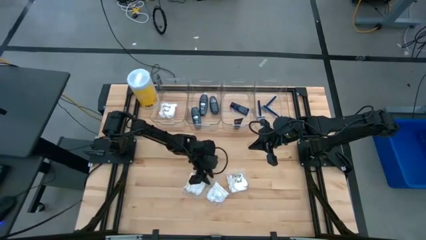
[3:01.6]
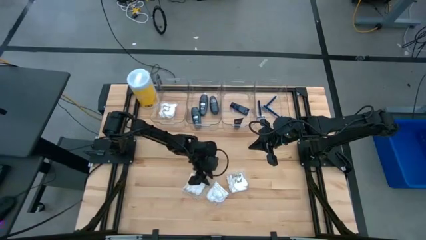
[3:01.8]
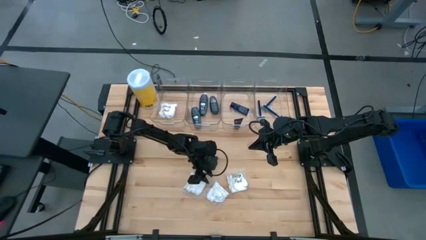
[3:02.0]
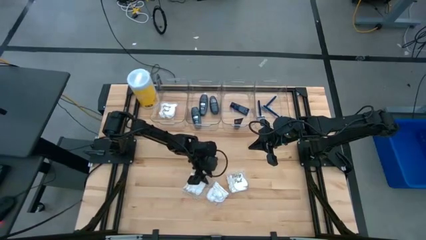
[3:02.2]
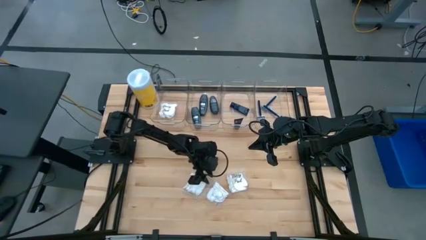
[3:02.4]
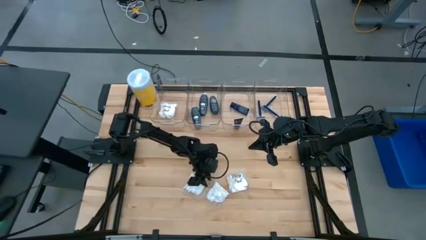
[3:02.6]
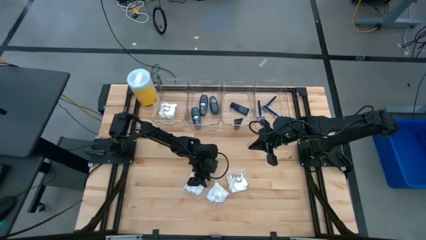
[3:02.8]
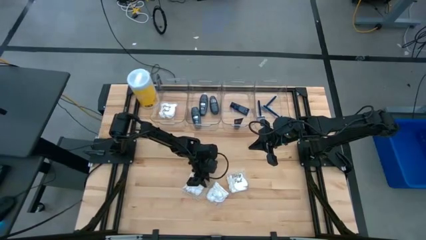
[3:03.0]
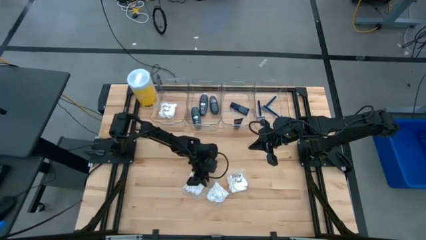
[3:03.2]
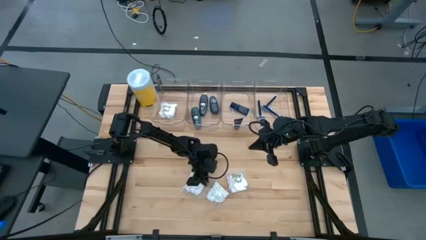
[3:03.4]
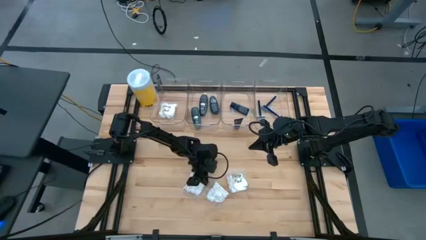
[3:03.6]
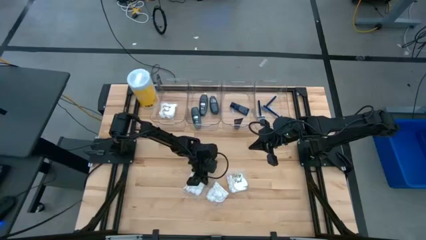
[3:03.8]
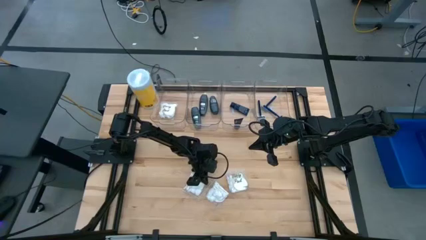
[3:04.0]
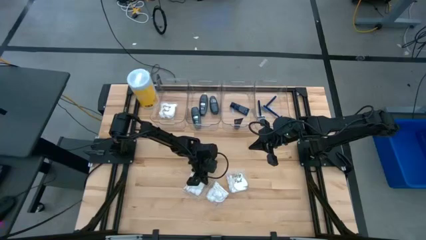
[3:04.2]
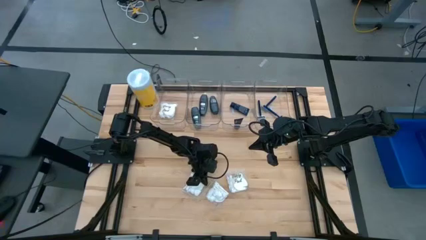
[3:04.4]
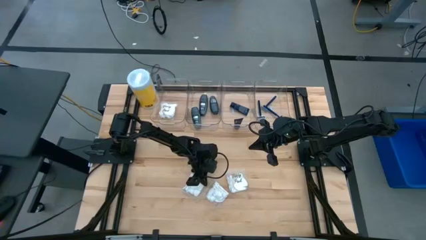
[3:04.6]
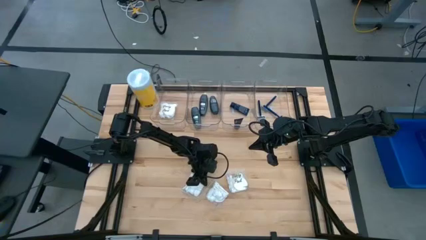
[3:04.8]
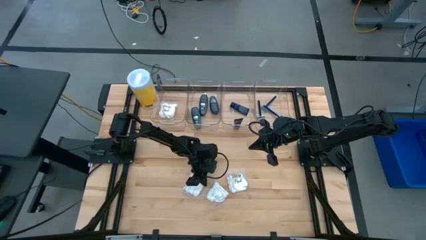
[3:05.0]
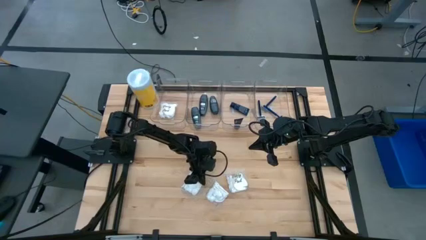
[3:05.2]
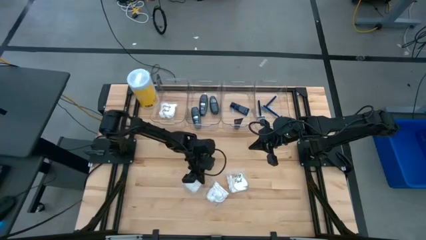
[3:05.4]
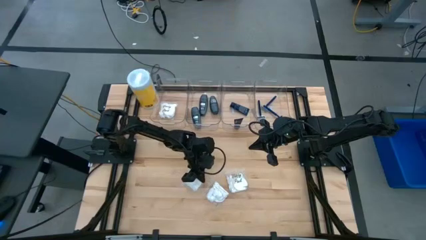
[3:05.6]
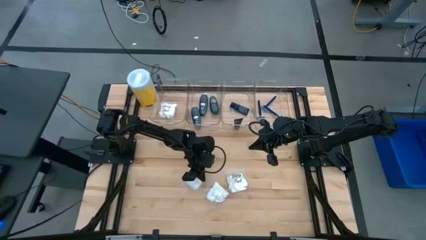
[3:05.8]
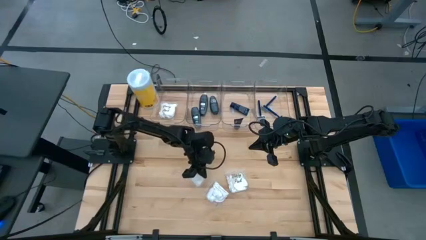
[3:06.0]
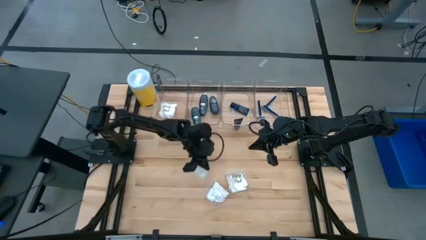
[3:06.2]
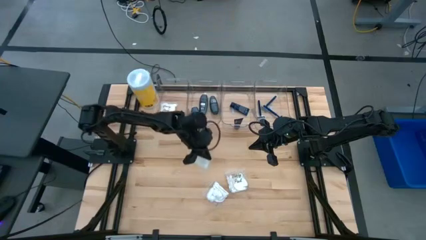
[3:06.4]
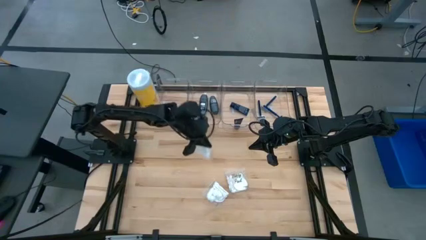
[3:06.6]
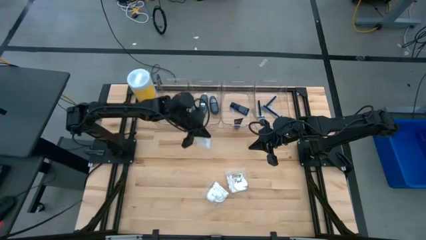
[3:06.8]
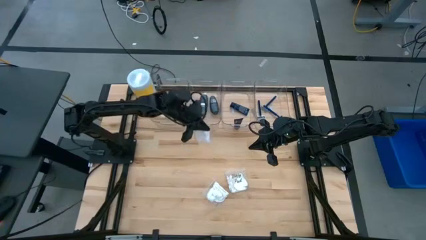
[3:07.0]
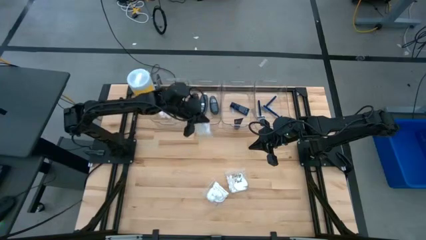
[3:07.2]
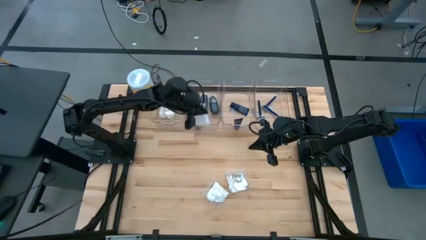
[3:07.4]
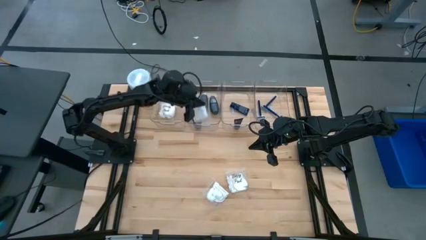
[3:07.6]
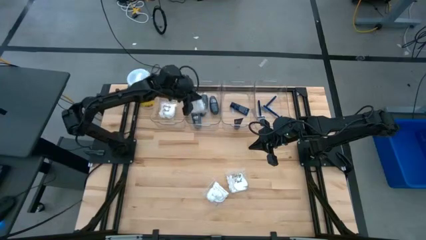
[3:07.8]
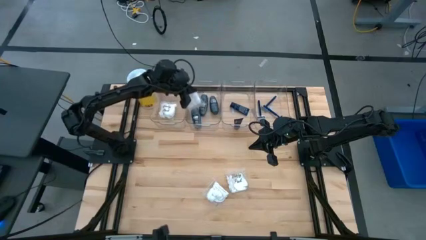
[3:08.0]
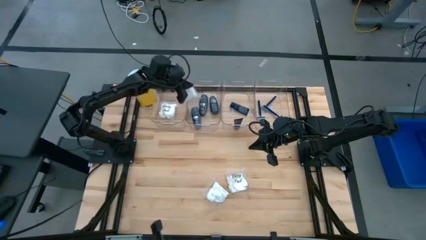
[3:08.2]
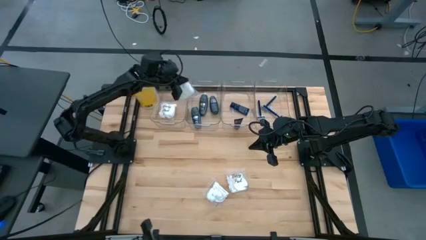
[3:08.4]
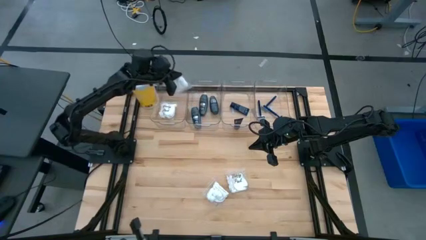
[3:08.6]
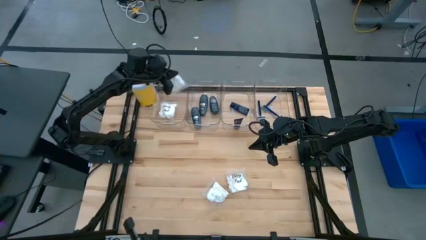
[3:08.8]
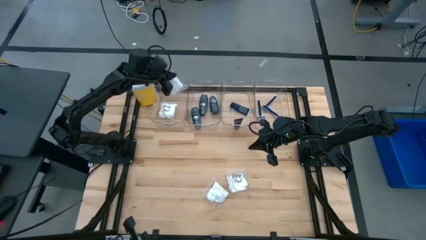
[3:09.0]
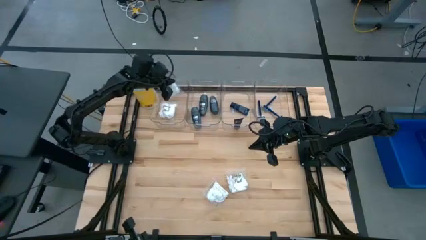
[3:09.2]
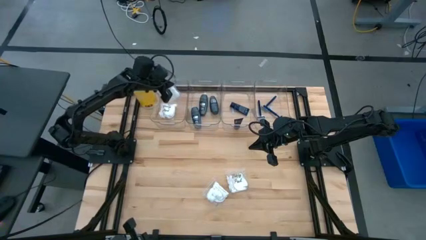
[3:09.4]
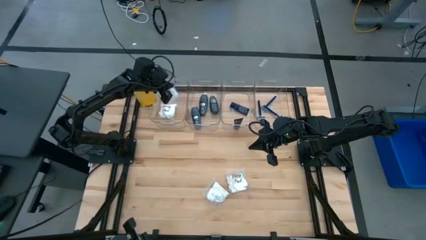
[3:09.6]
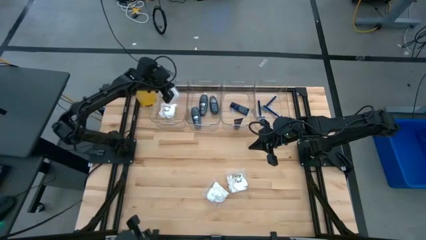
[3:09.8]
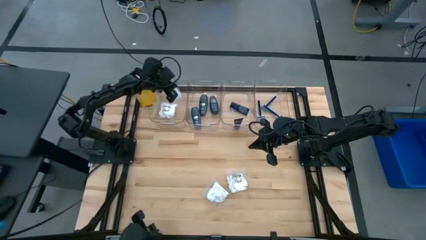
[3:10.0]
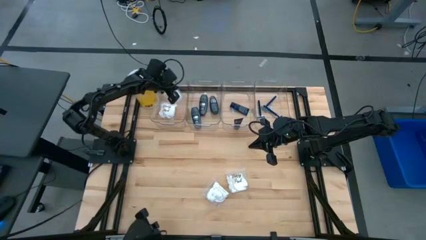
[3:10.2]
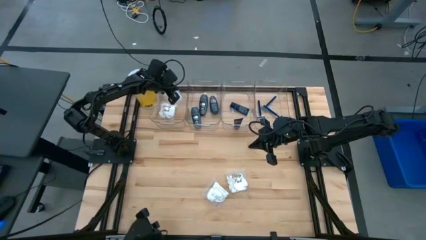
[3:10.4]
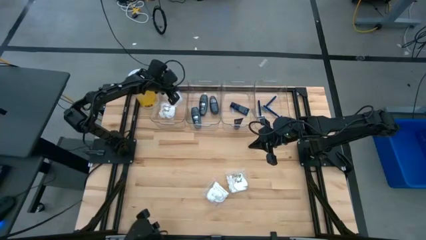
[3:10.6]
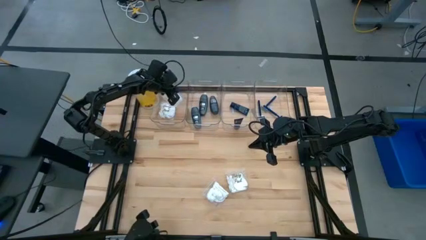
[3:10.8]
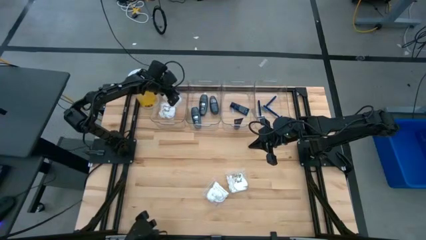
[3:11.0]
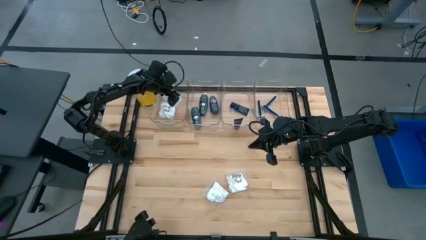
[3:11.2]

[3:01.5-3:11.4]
Task: Pick & Place Travel size toiletries
Put the white cotton pack into the left transparent bin

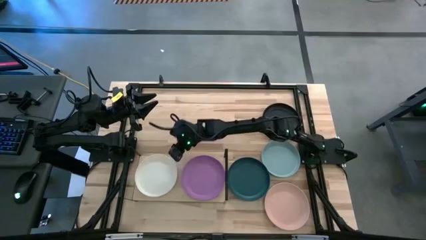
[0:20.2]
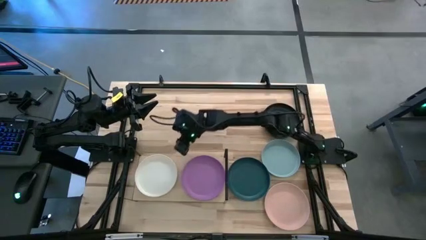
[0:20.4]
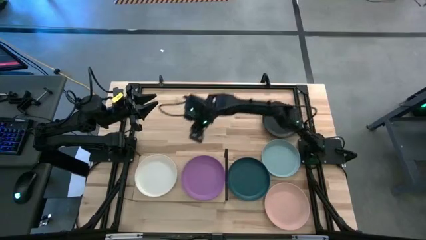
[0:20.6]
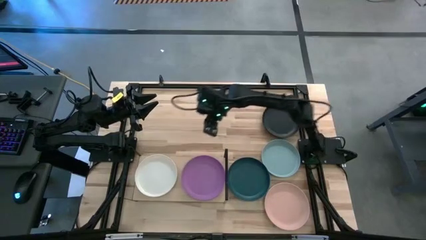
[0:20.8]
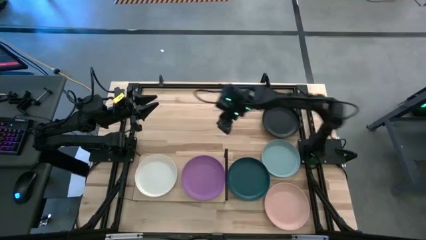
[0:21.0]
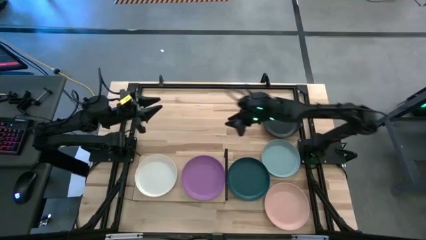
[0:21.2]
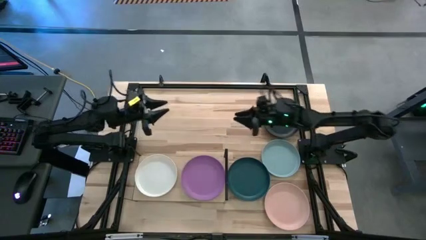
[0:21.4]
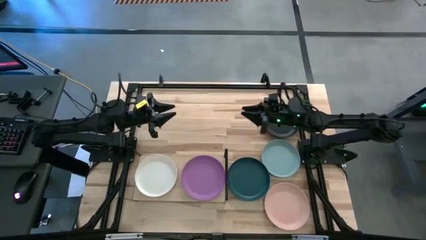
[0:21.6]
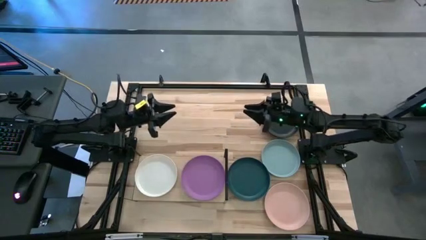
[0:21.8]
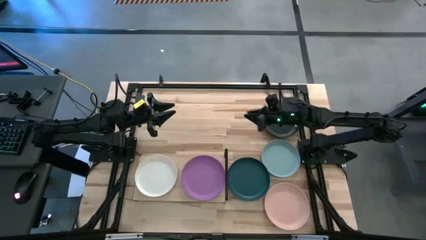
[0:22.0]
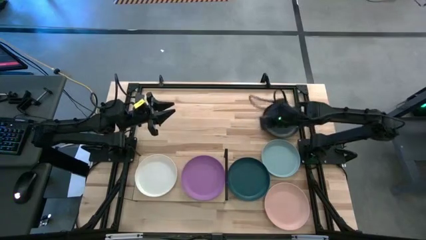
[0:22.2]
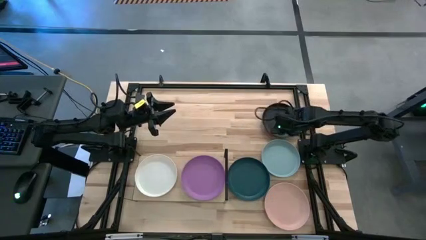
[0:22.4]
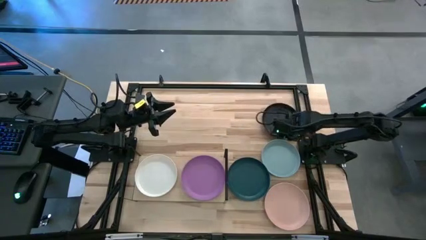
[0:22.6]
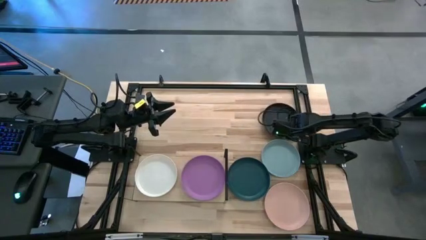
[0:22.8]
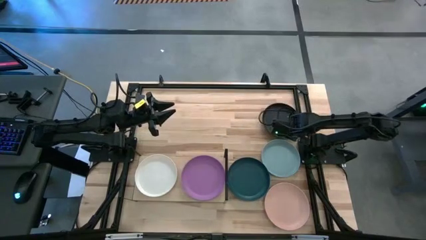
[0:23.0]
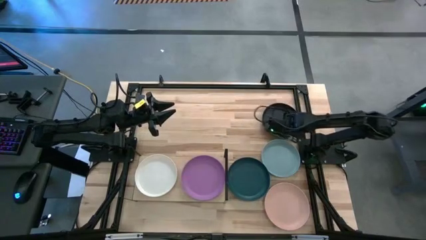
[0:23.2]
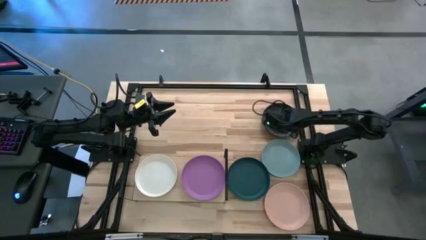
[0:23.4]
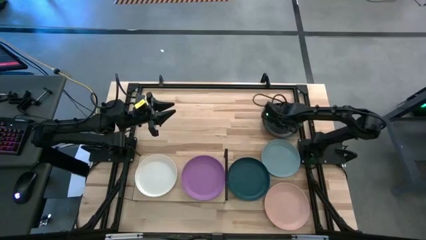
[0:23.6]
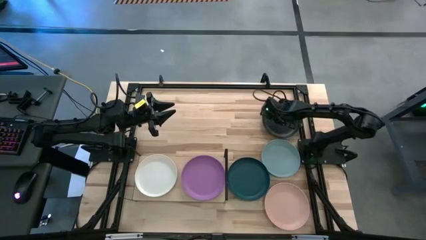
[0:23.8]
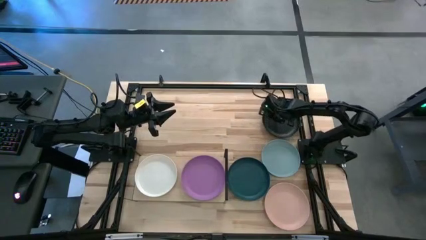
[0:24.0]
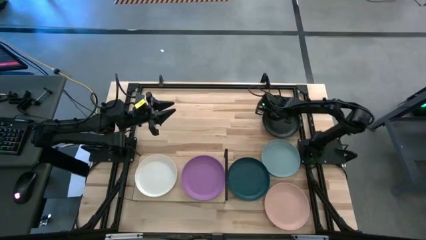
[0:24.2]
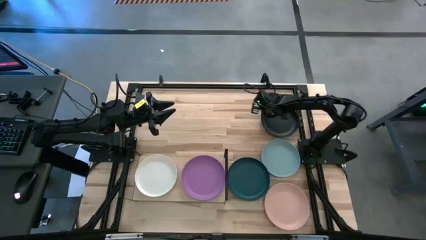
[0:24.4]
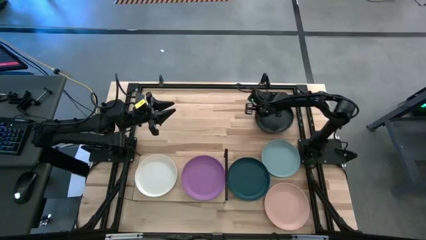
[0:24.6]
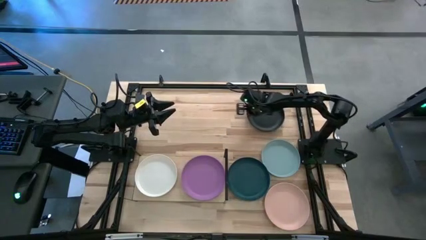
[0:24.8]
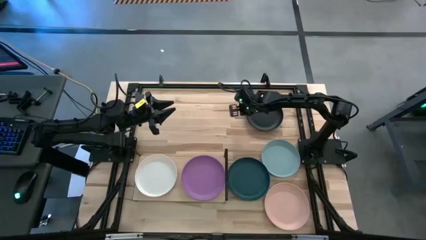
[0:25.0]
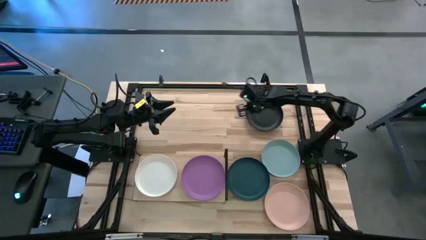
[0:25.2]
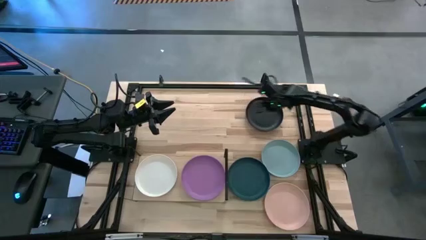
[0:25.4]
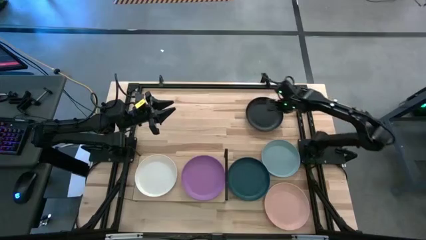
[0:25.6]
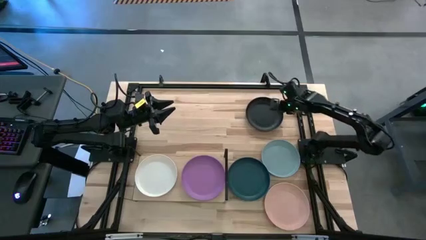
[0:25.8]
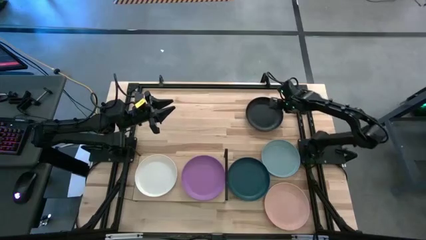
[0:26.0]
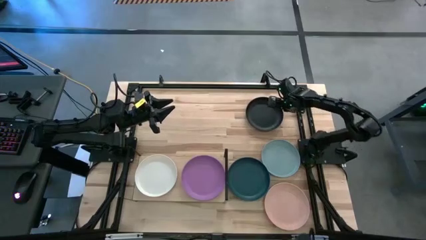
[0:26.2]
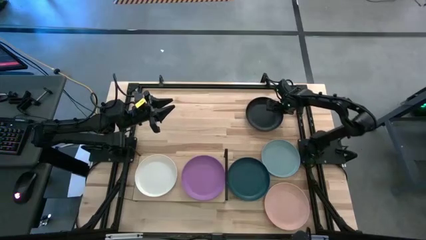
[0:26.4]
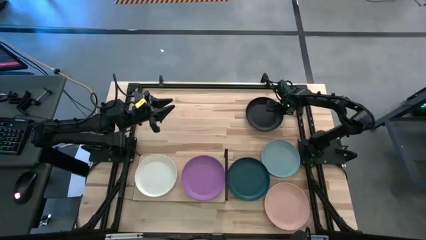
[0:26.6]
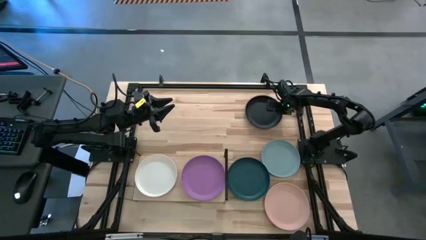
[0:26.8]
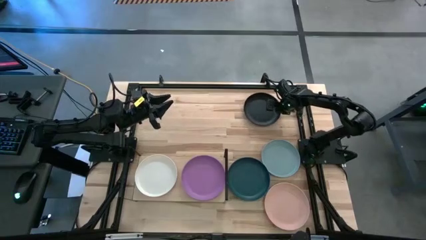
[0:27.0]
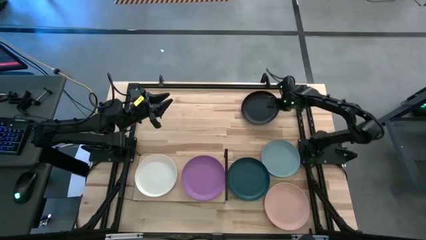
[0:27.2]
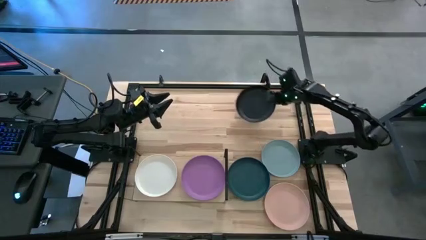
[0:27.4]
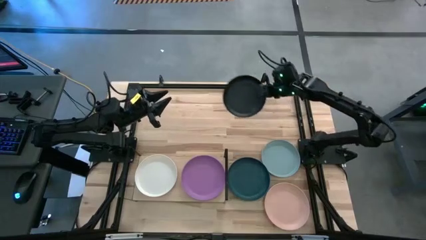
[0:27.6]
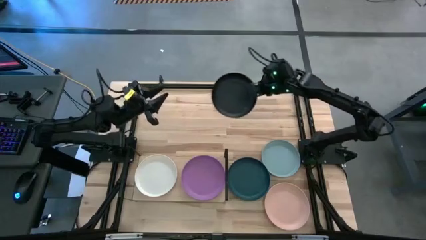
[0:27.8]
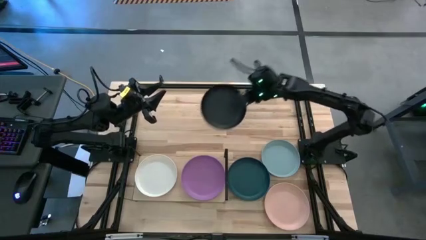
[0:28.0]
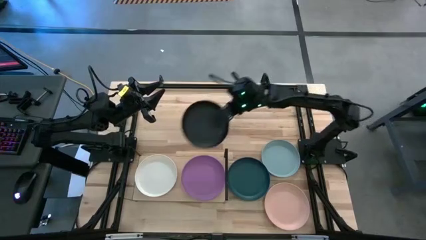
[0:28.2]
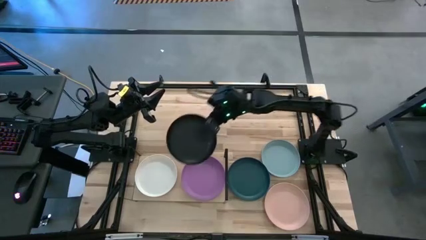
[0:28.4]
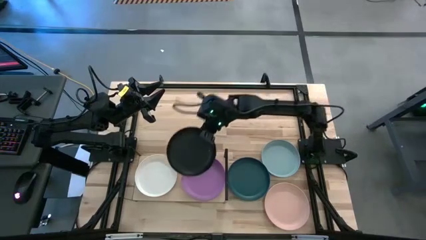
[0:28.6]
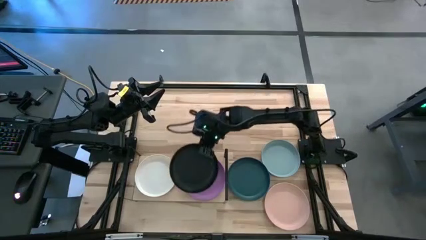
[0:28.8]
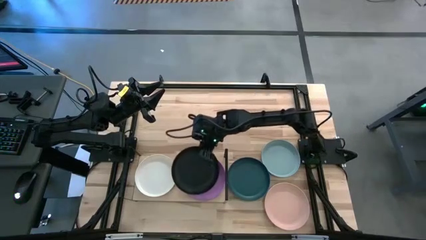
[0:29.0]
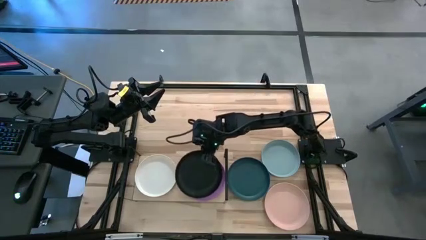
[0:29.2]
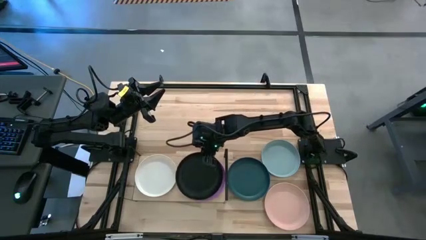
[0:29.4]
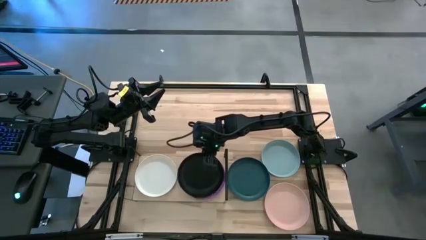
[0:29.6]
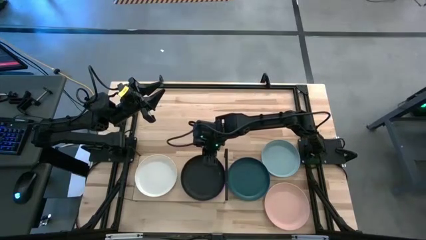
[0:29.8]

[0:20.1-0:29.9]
Task: Place and stack plates onto a shelf
Stack the black plate on top of the violet plate on the shelf
